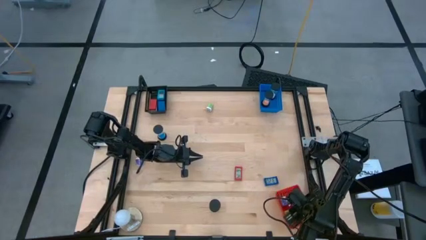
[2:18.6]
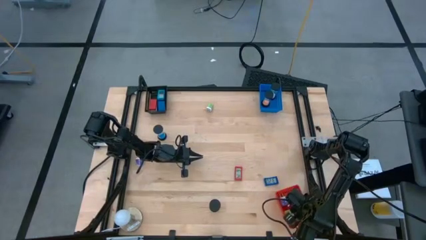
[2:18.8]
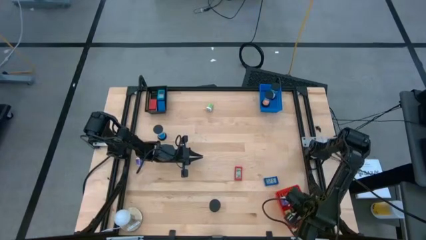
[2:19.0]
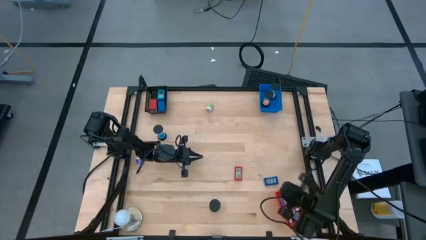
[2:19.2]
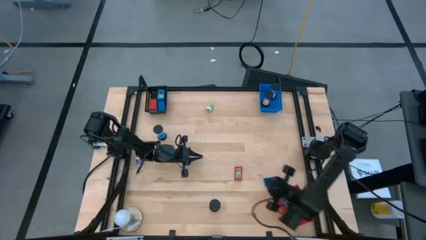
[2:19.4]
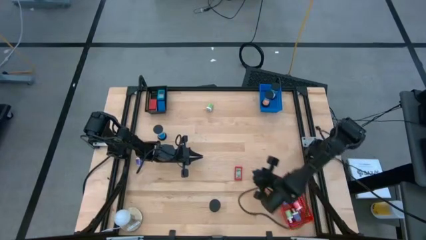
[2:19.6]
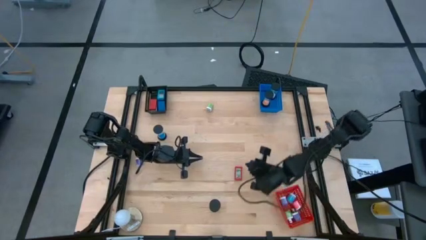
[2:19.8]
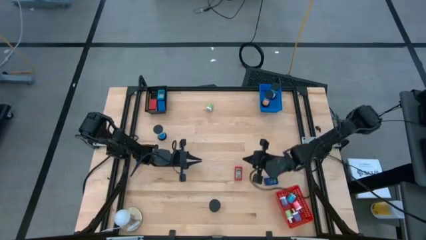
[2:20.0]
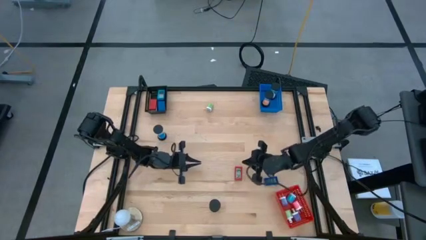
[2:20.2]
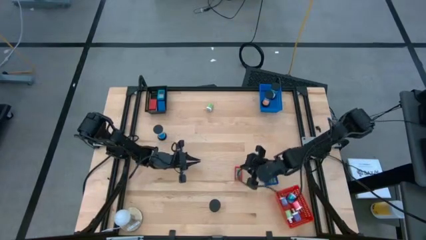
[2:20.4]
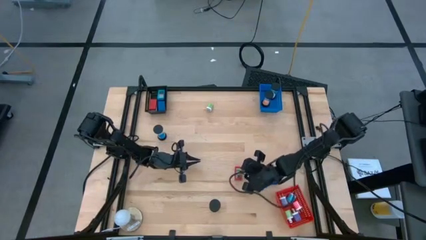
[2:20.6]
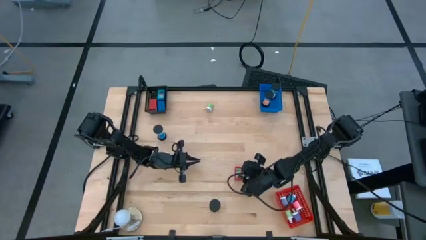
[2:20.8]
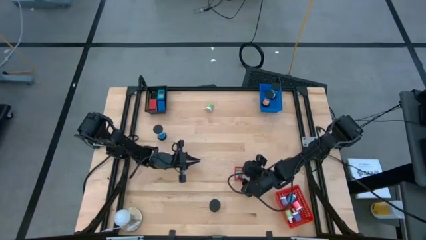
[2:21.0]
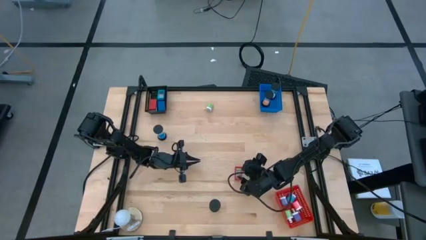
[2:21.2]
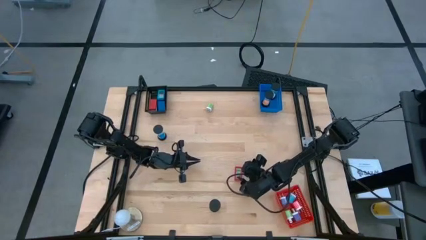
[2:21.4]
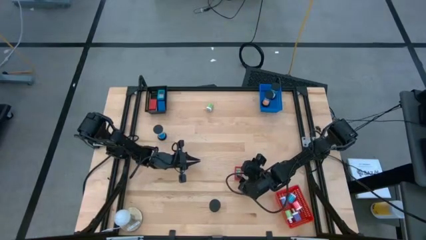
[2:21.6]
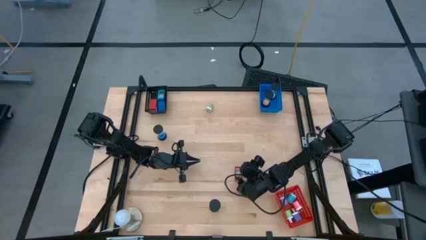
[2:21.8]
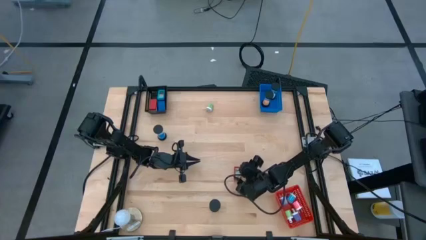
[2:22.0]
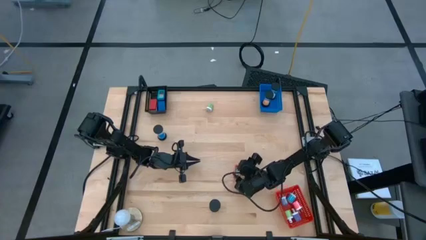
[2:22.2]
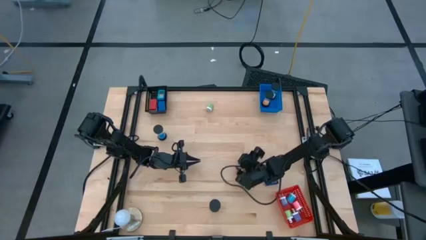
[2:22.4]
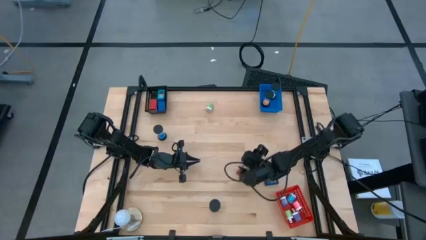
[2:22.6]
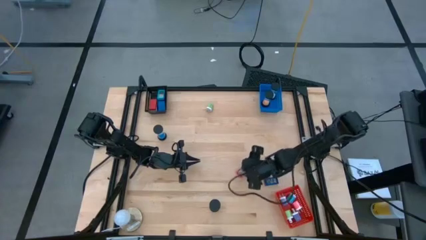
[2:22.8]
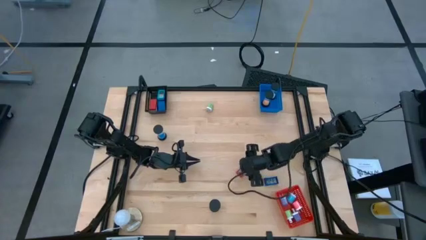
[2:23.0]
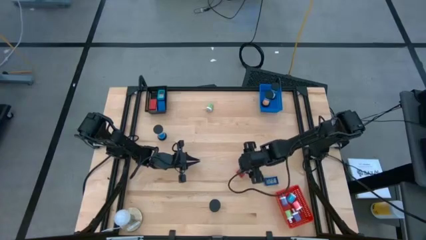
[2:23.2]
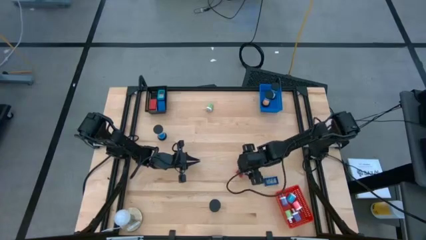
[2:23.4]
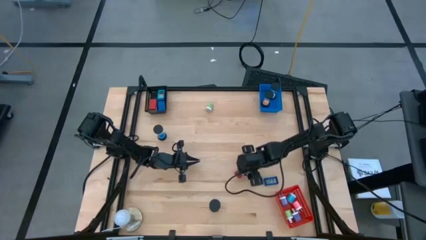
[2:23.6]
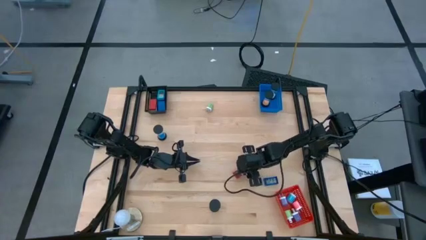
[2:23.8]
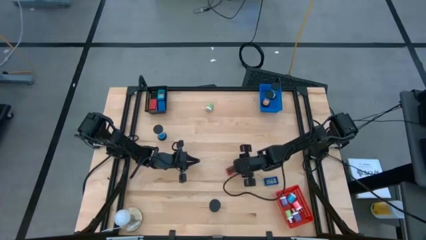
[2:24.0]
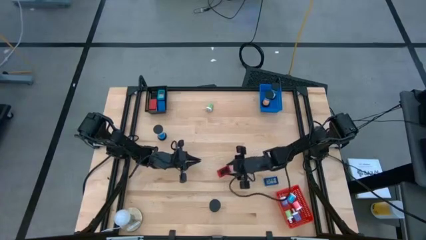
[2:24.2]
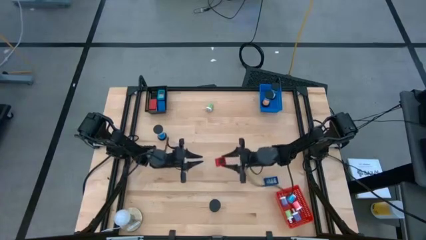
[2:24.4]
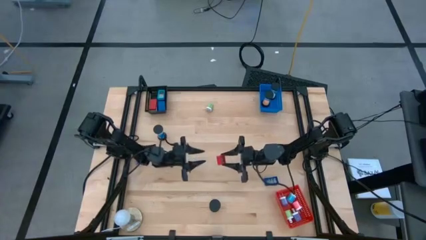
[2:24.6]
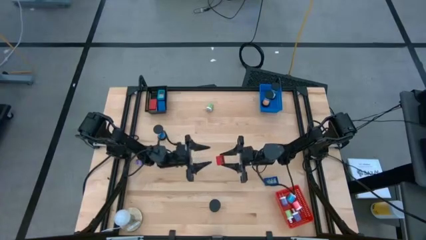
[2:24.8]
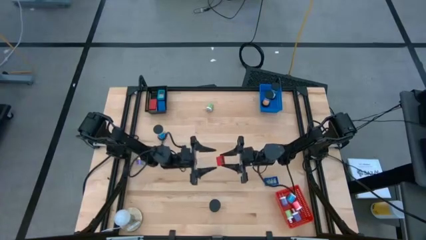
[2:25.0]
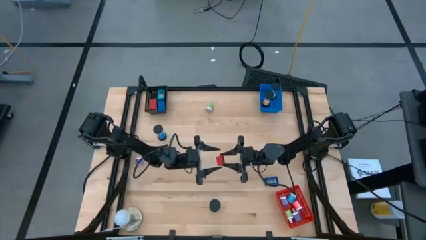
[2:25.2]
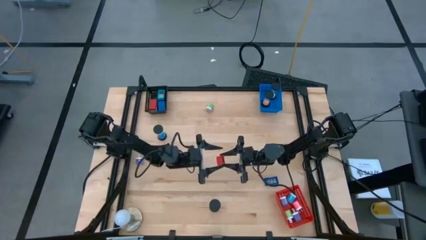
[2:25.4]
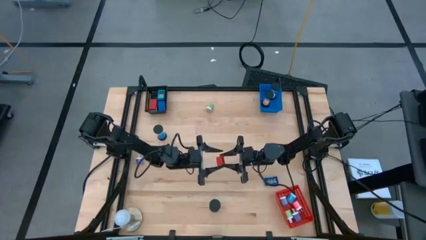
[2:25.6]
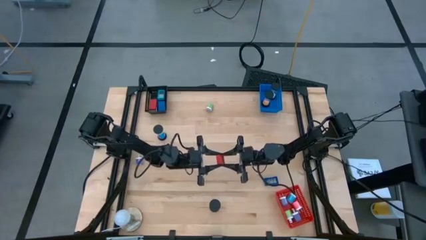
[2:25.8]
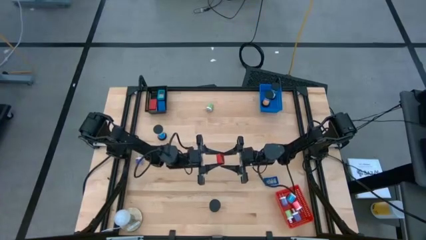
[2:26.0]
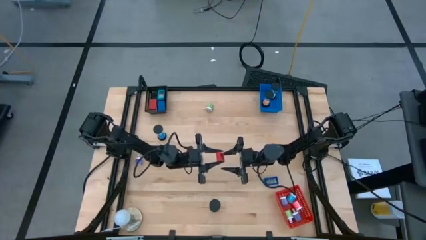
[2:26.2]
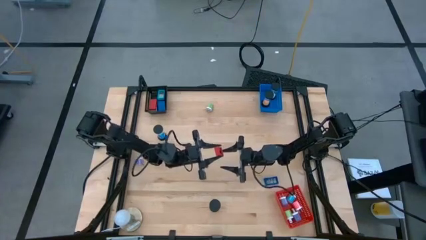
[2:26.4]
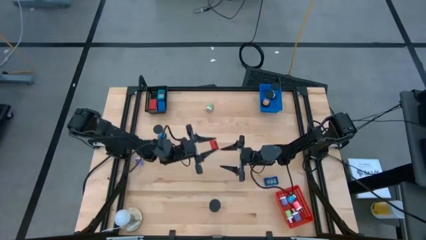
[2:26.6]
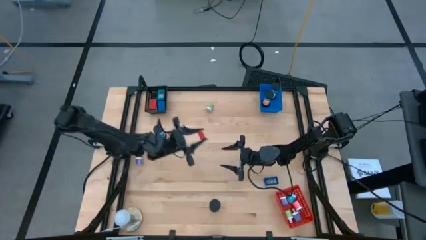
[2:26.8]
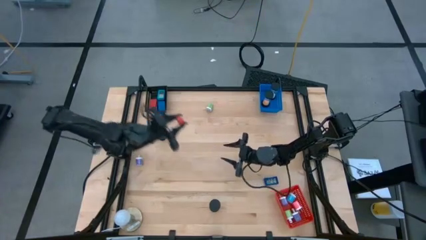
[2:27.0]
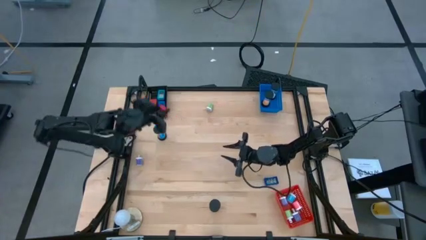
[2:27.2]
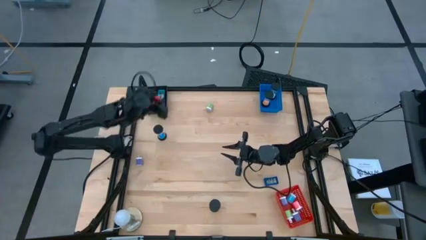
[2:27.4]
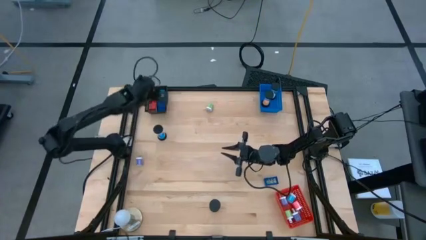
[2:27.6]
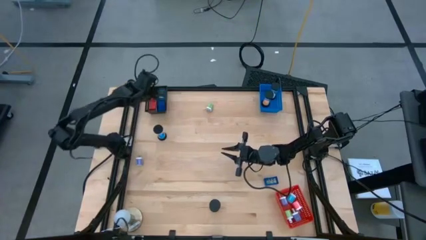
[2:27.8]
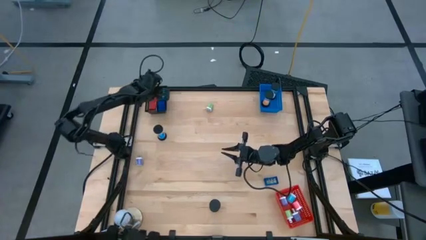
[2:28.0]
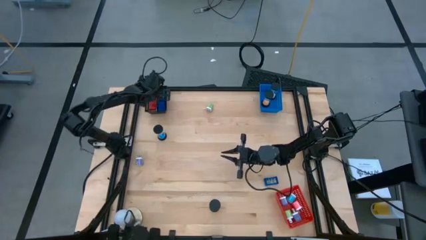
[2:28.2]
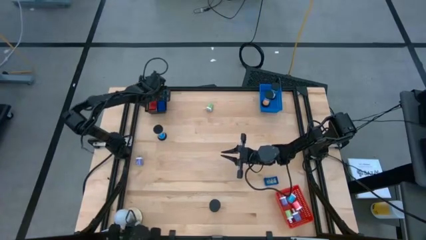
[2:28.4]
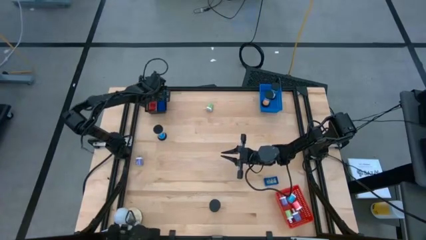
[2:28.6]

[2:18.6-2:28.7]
Task: Pick & Place Office items
Put the red digital timer into the black basket

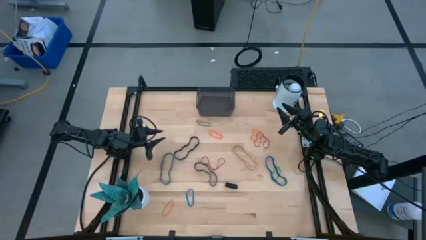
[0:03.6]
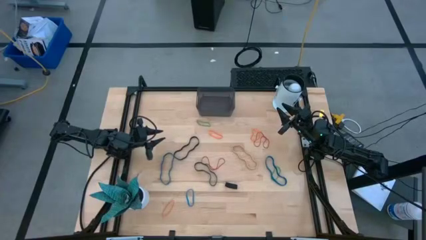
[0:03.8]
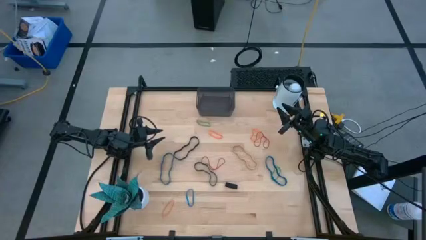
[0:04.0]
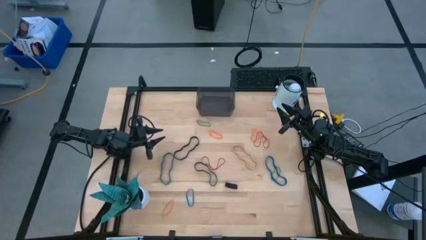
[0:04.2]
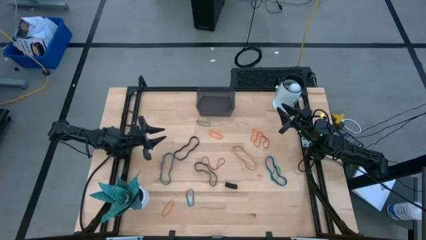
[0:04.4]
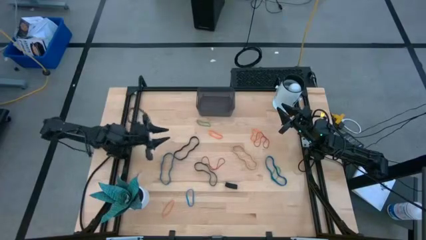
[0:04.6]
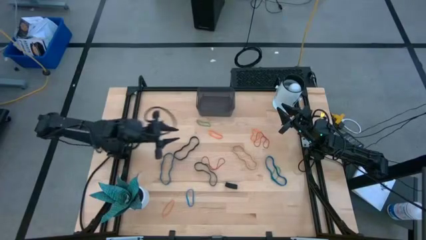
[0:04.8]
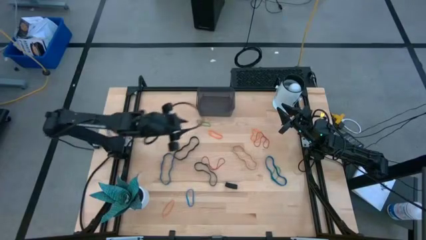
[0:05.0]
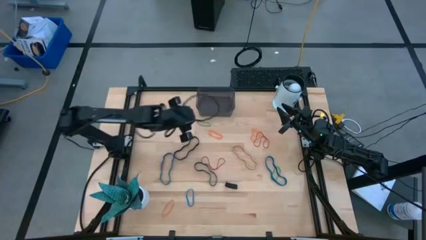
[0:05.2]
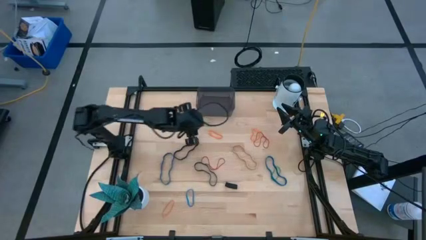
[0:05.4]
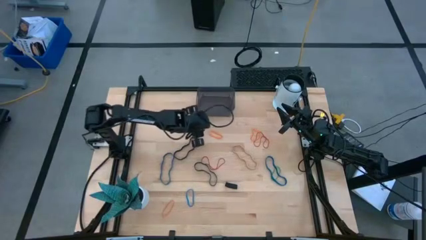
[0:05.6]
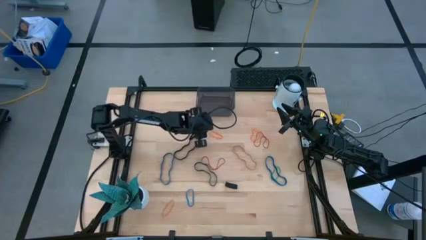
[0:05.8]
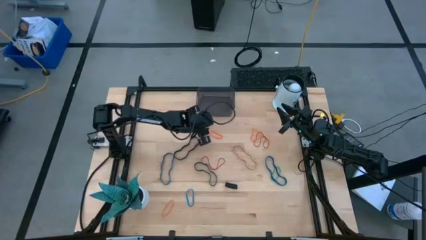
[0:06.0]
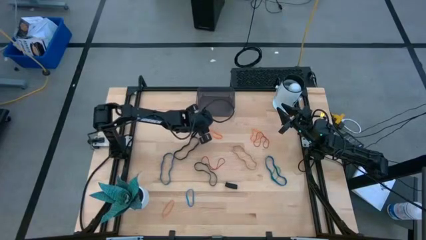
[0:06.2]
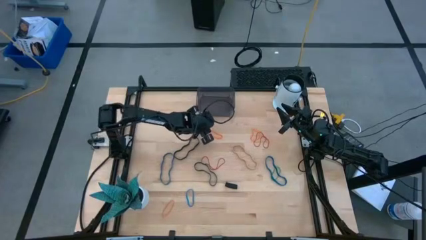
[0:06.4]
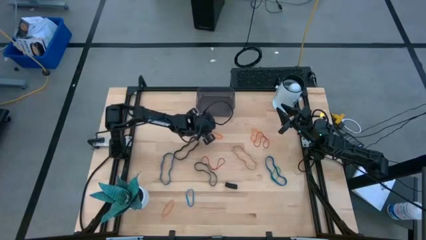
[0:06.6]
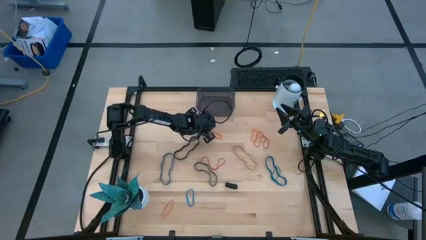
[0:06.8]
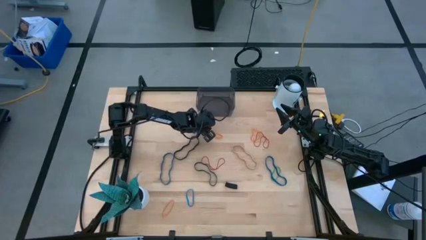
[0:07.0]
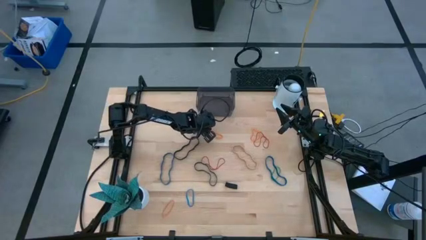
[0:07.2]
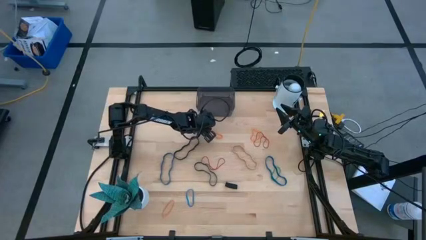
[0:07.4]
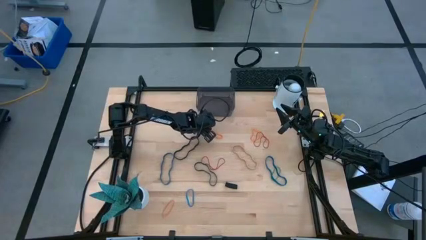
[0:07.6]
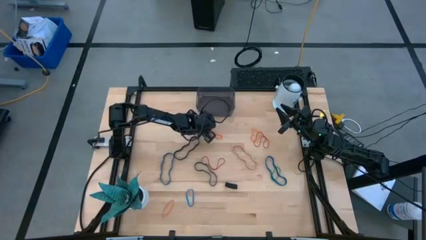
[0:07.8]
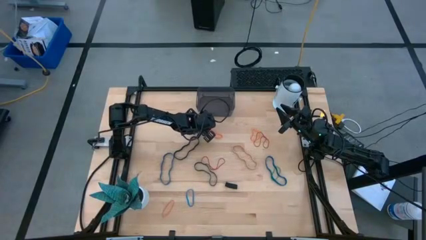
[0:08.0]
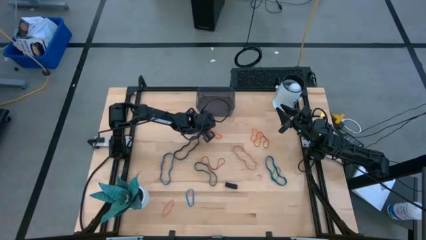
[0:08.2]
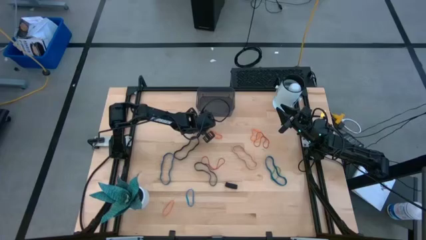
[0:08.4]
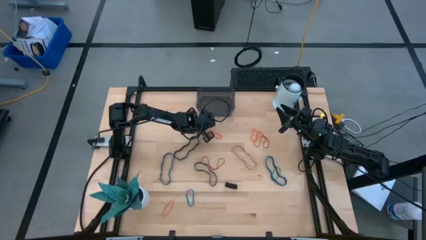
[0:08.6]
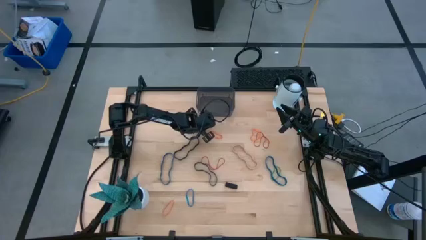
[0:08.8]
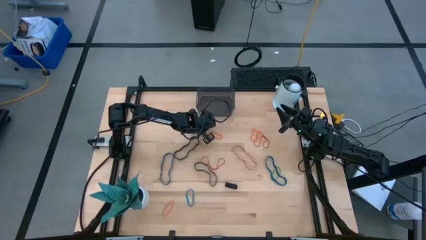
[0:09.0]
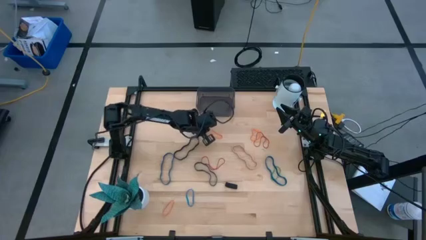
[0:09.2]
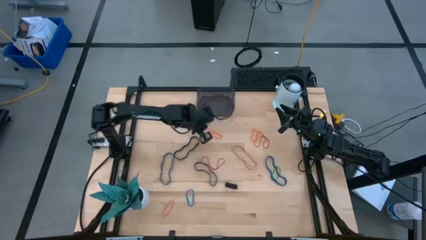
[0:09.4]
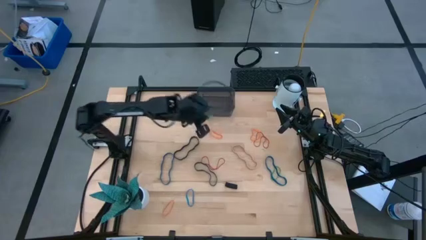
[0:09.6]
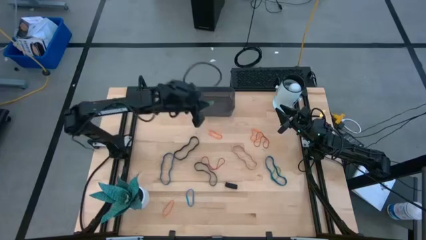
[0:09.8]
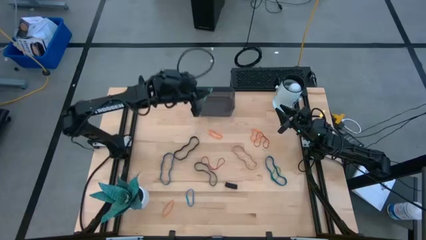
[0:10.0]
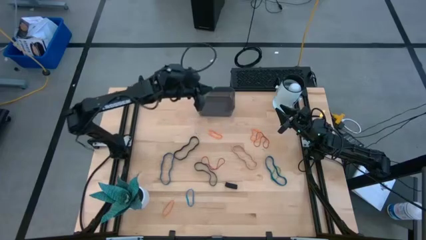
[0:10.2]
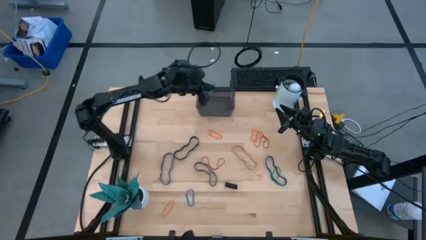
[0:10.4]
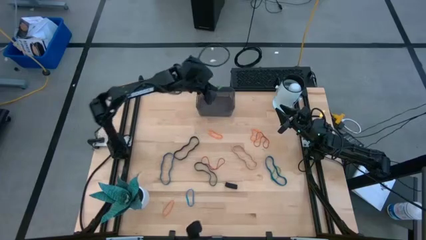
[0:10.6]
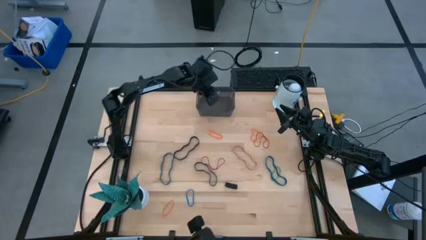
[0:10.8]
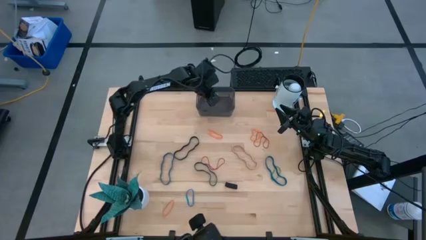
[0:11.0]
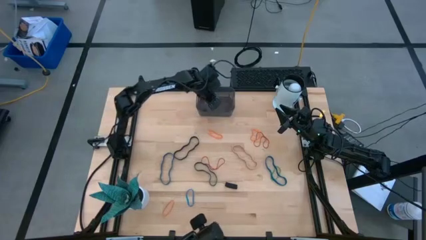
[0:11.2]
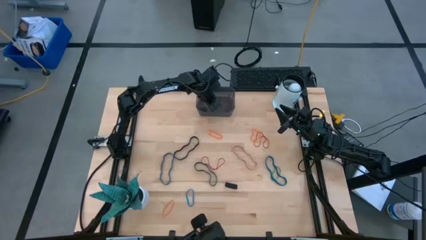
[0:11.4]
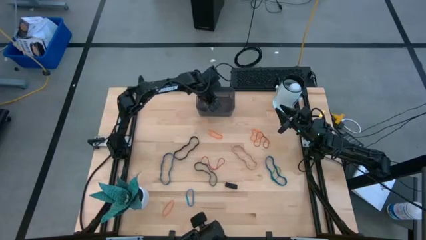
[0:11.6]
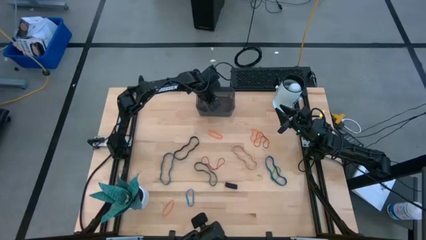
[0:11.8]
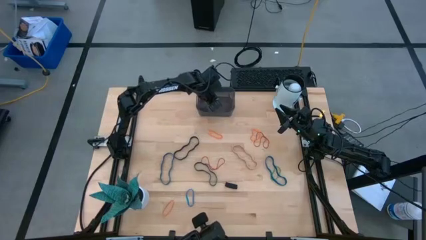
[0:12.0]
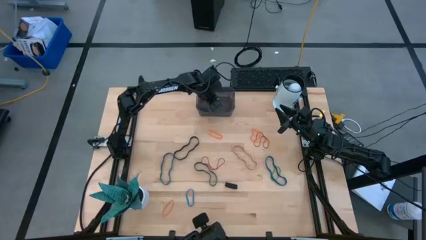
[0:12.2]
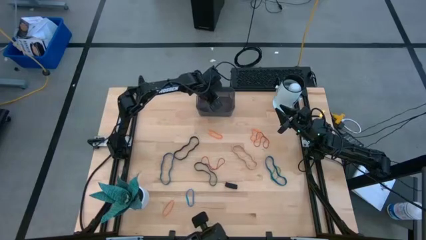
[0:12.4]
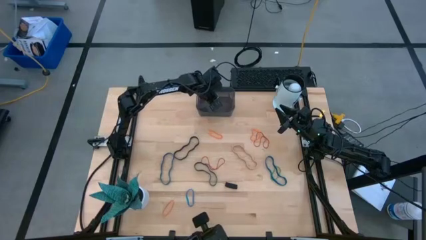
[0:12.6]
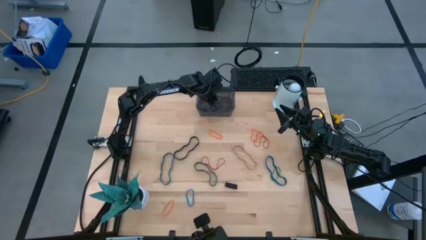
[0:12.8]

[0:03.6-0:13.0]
Task: Pick and place rubber bands into bin
Put the top green rubber band into the black bin
